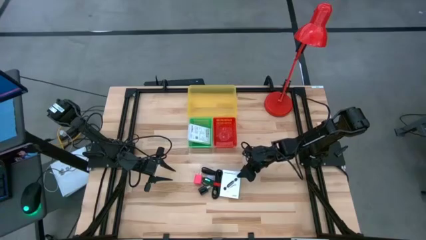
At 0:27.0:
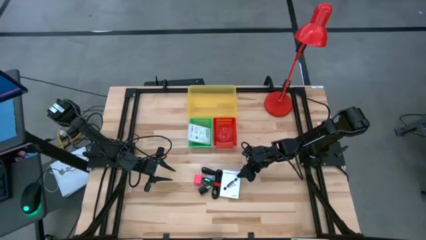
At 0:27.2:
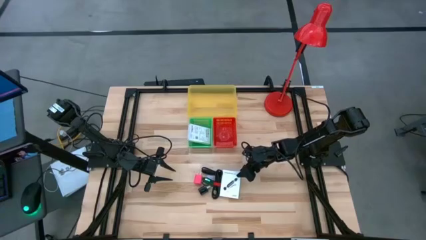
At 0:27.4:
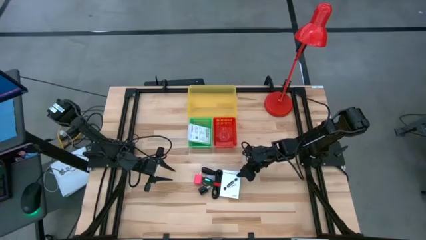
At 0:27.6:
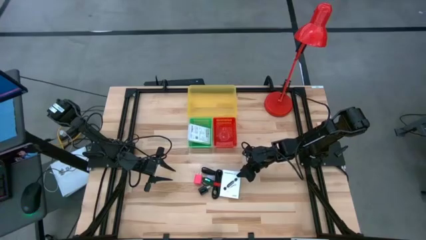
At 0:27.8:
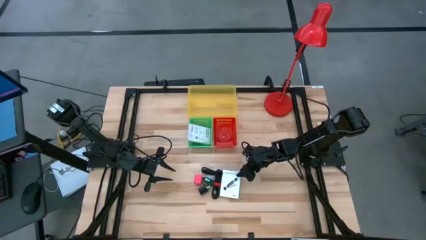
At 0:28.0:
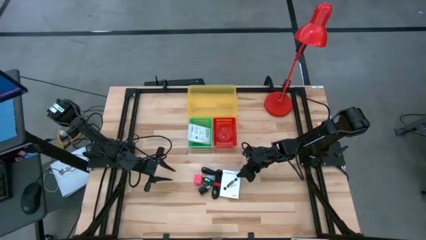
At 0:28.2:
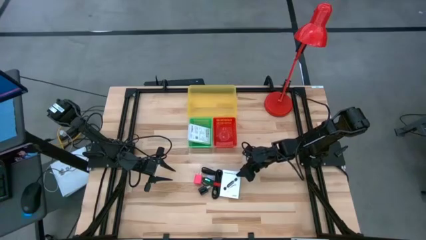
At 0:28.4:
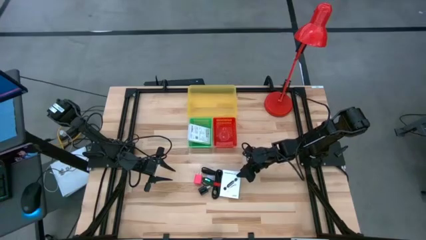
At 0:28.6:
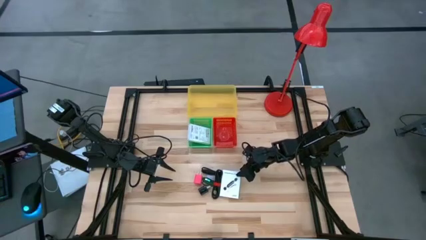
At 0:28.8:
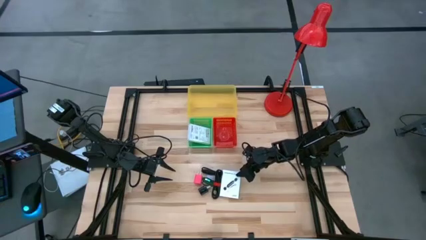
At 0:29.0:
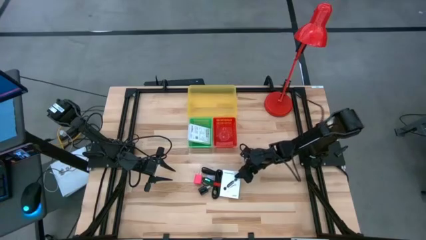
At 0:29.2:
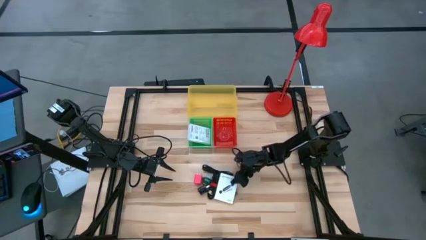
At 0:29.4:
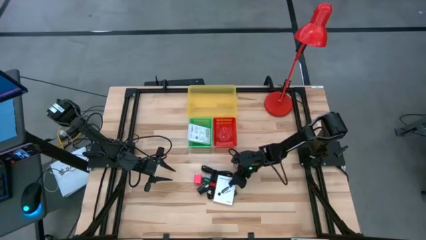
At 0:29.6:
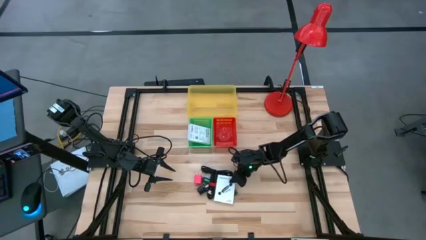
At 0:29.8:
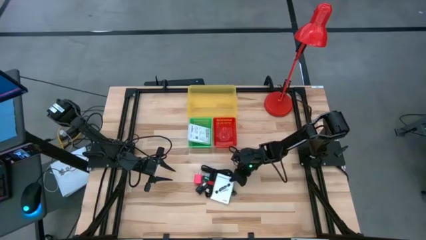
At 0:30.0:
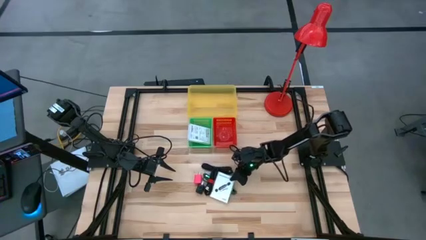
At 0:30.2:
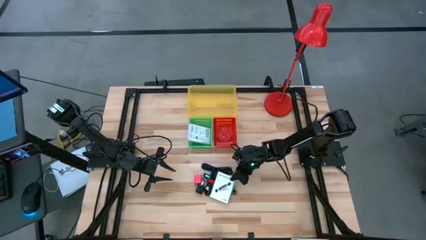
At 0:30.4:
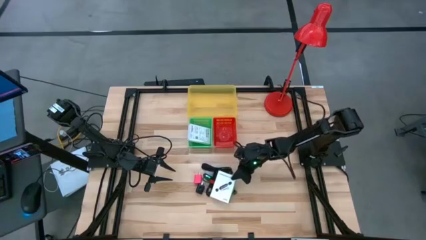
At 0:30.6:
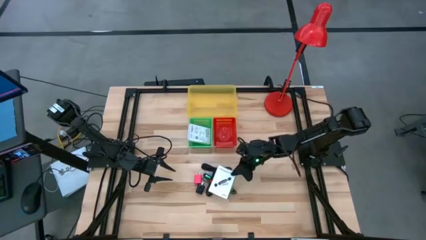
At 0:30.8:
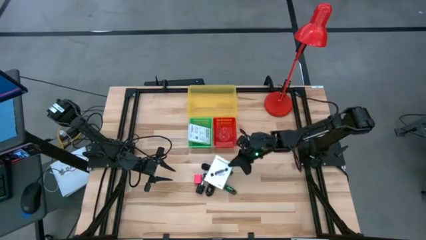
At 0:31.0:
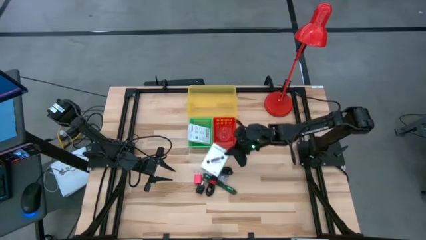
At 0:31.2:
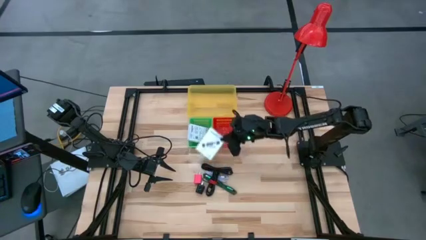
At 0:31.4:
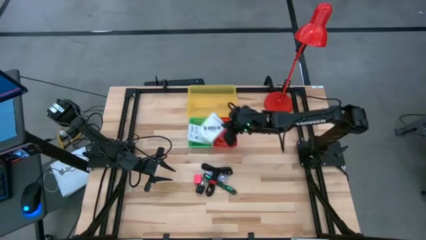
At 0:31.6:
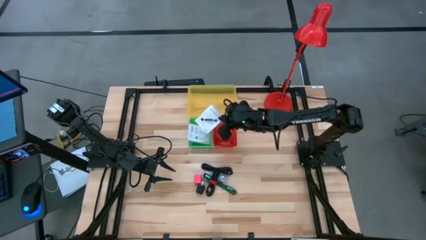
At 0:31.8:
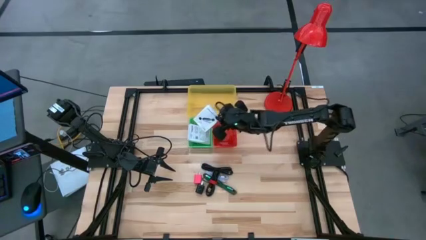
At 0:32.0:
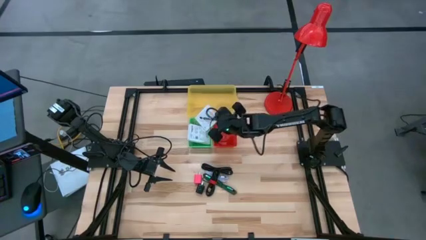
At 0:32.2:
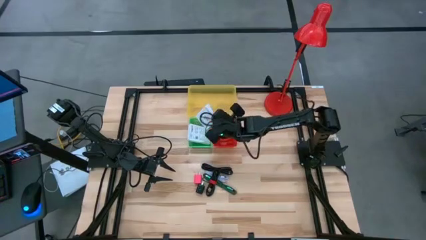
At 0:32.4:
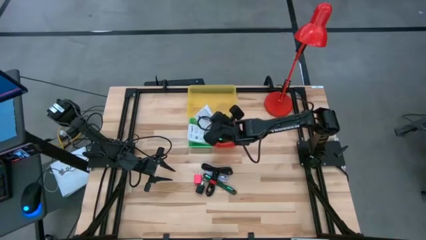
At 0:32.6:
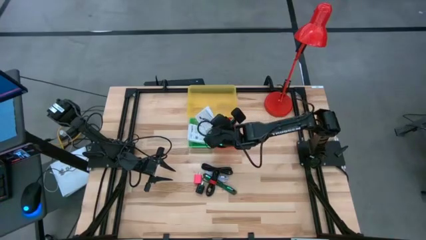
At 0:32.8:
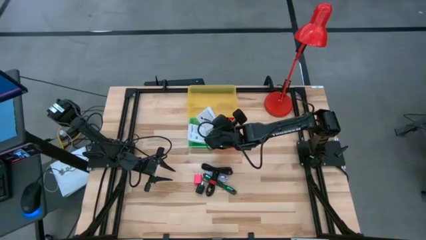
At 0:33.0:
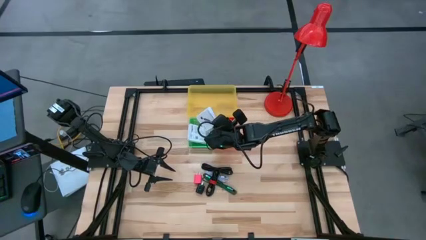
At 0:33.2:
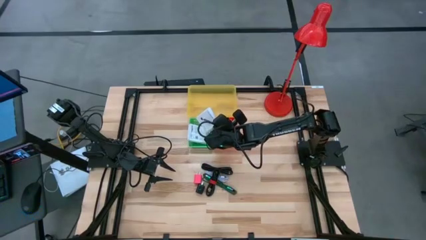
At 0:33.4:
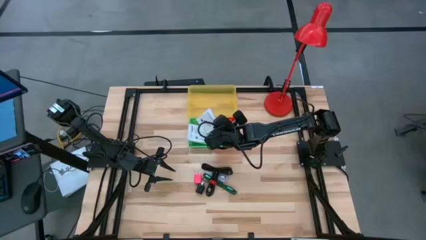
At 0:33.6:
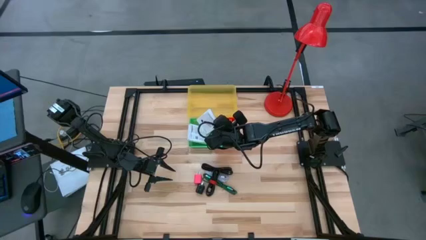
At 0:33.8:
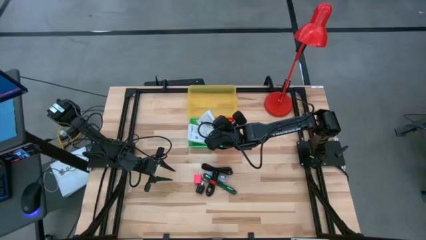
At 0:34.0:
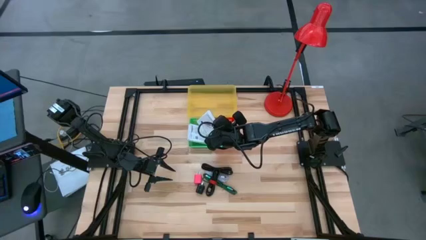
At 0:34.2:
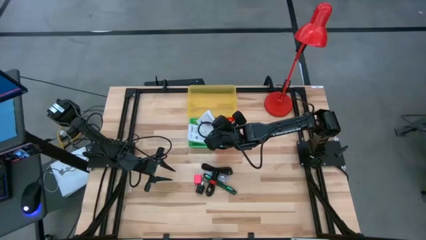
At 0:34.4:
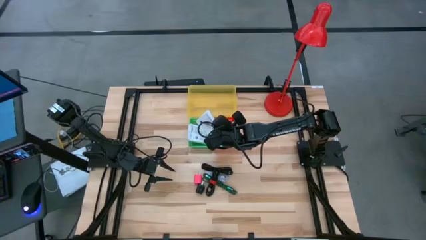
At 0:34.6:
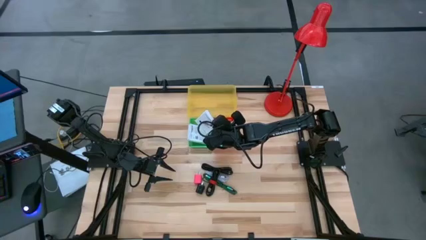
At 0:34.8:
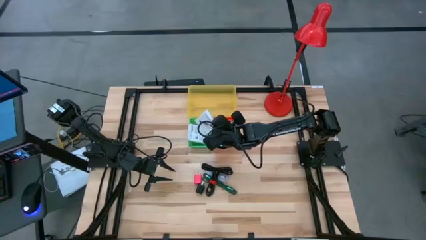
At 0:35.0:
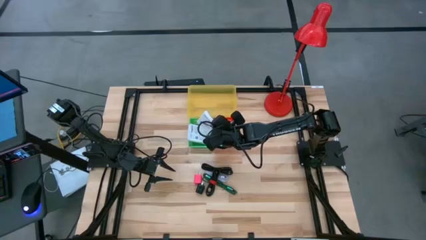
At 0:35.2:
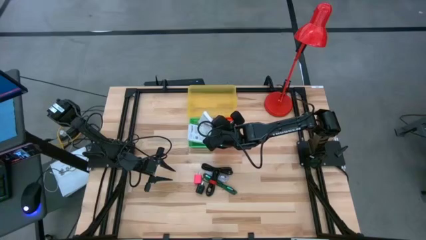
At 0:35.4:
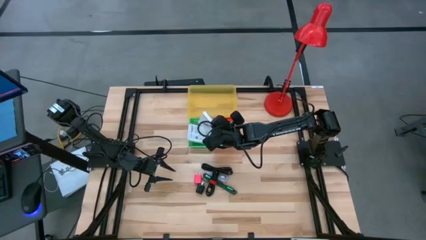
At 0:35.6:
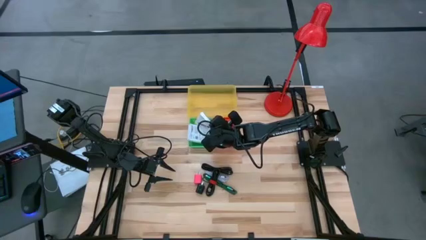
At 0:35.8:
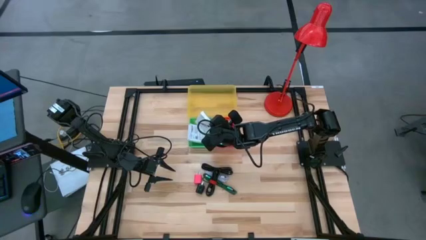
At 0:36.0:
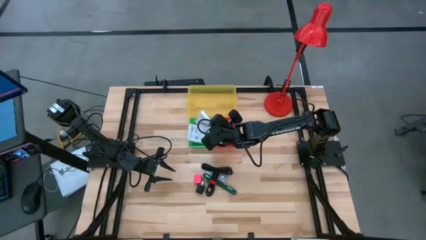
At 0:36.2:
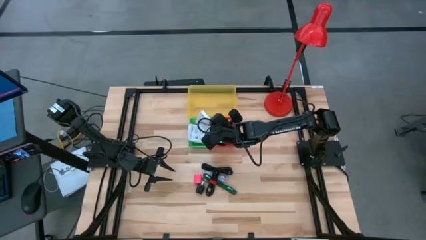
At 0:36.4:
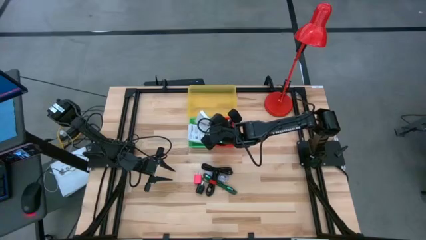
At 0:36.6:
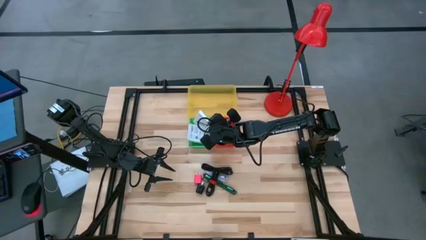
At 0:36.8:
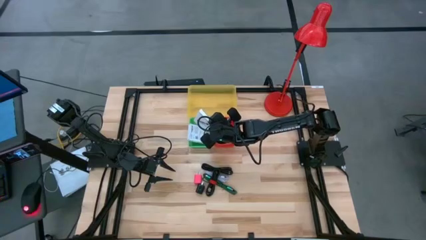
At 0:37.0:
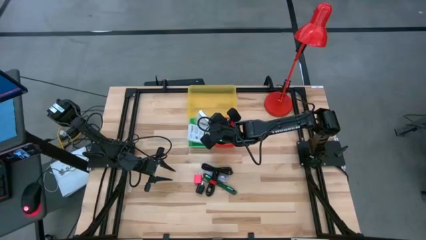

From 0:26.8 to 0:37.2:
Task: Pick and place items into bin
Put the white box card reader into the green bin

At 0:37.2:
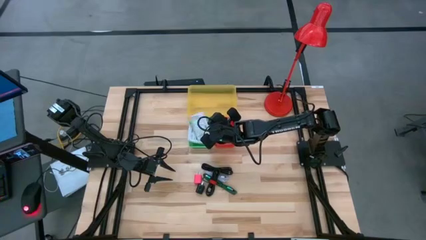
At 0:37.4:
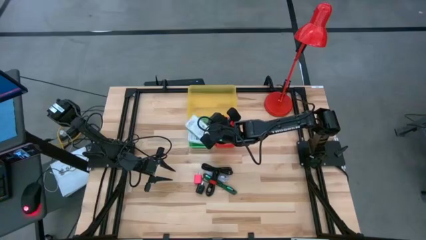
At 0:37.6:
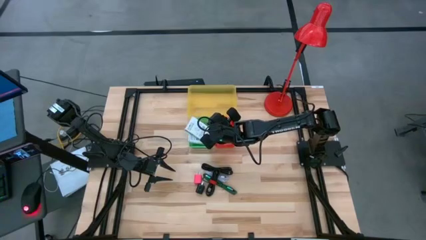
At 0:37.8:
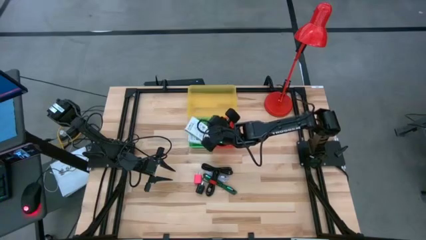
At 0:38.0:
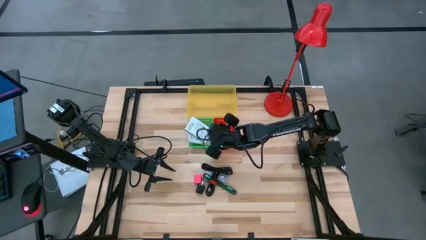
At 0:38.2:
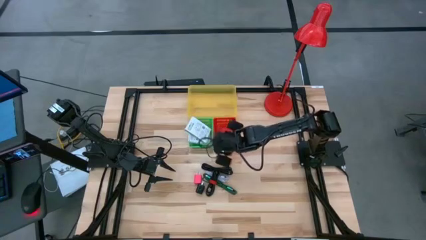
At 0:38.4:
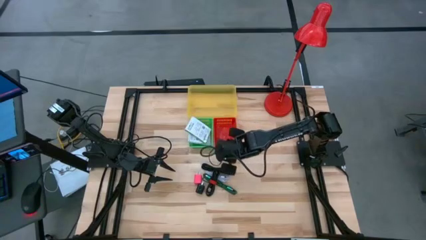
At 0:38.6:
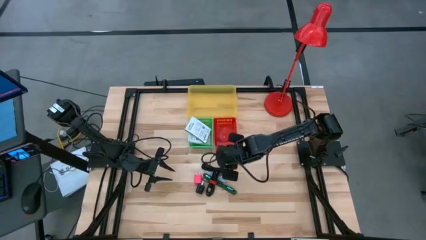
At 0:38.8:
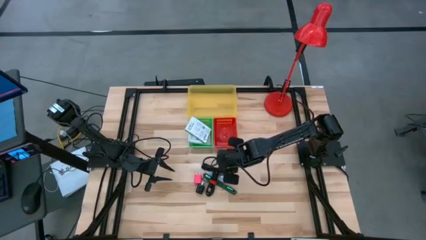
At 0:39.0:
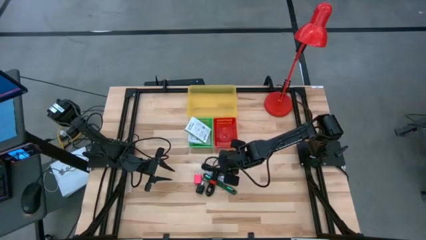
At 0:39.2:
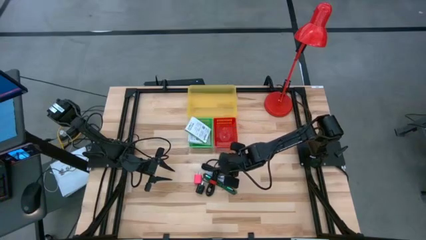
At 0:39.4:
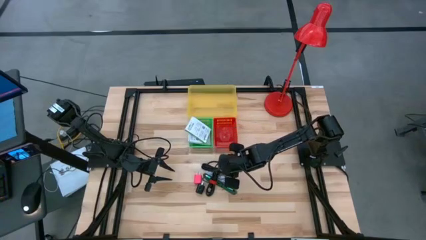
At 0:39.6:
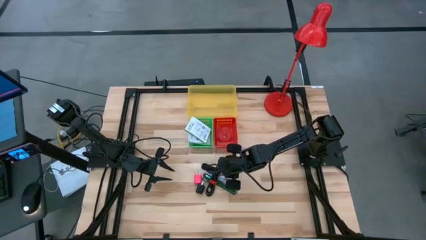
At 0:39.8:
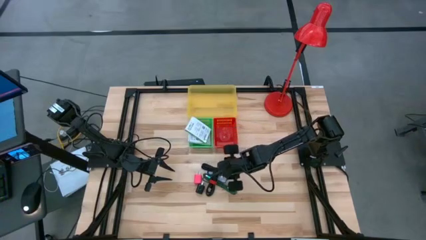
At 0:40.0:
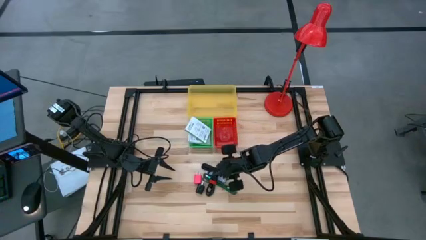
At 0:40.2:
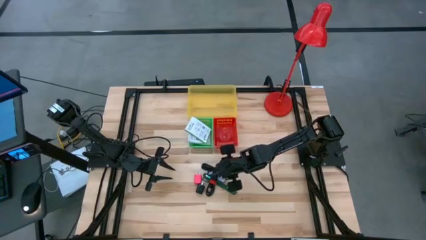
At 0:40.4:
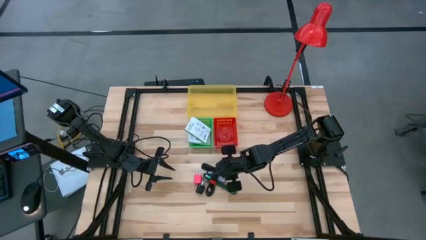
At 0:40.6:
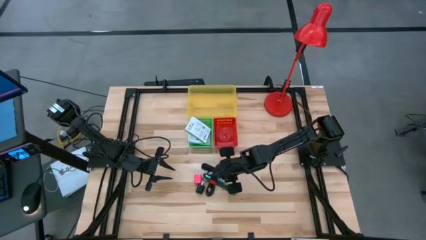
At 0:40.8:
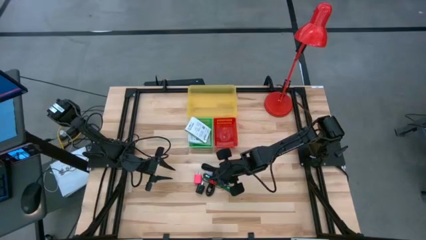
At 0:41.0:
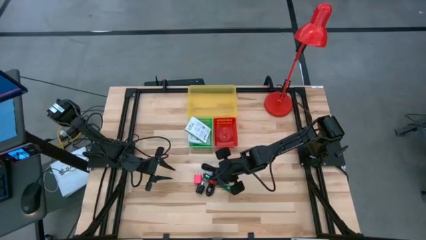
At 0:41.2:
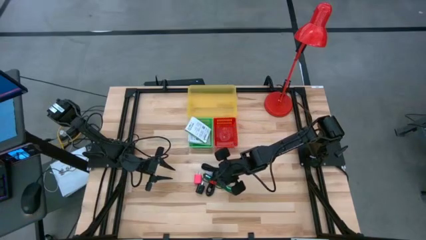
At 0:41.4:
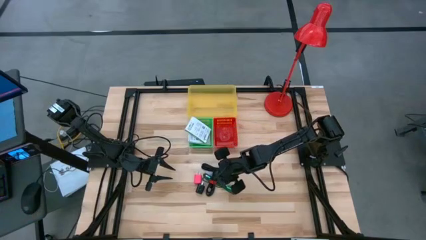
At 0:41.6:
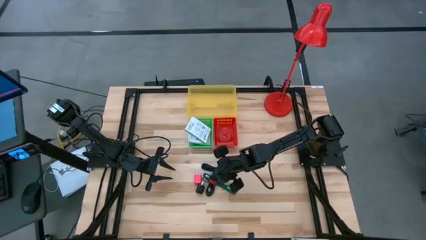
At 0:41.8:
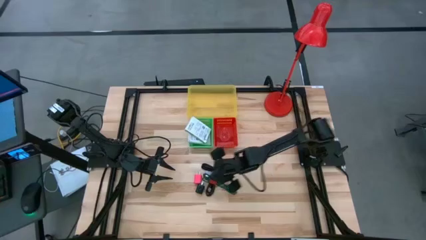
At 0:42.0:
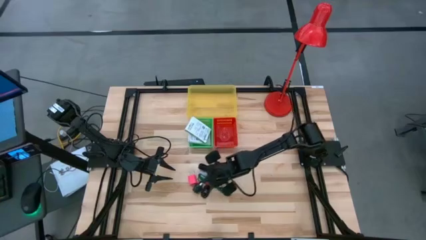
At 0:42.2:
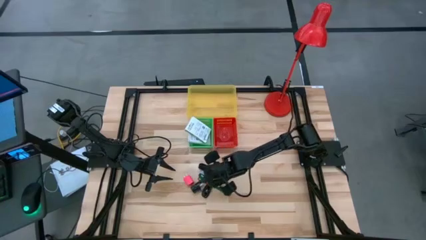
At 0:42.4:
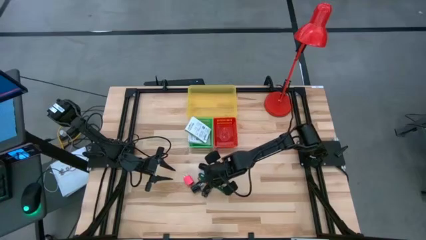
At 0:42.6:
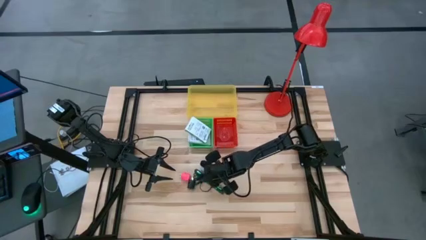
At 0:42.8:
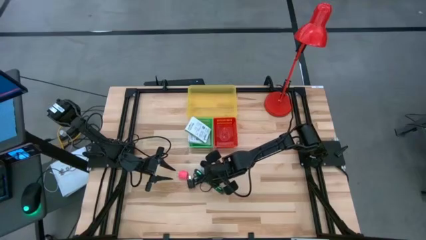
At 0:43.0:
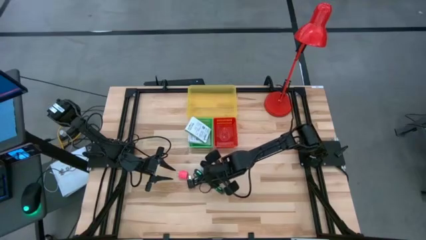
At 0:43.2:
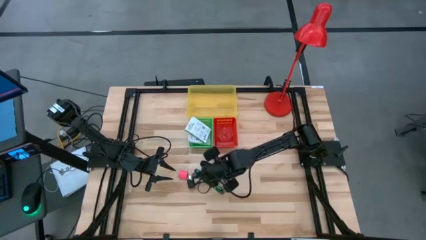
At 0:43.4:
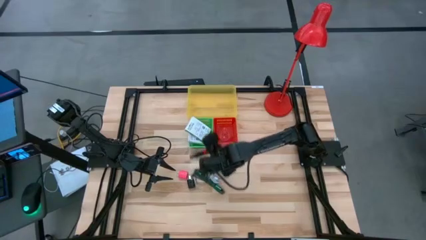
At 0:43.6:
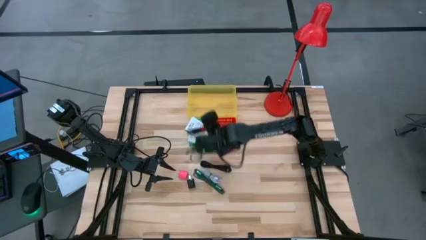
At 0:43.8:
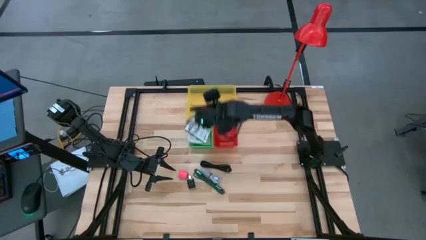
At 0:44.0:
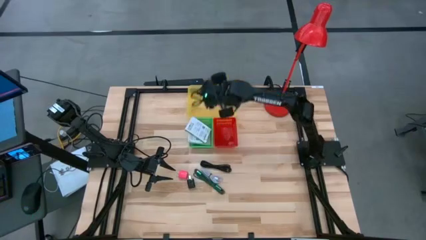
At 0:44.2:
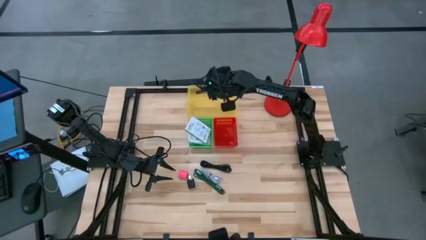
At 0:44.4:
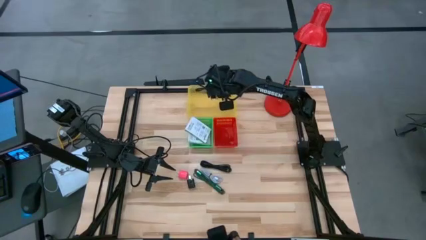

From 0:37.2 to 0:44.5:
Put the bottom black charger cable into the yellow bin
